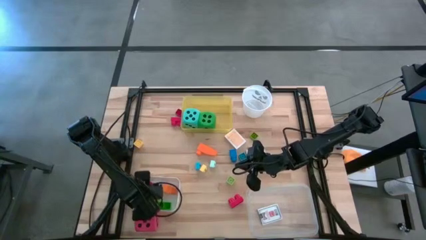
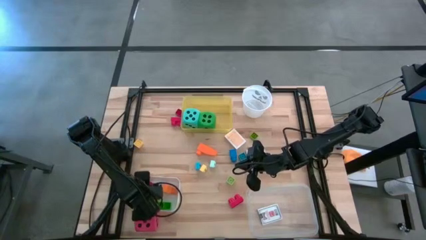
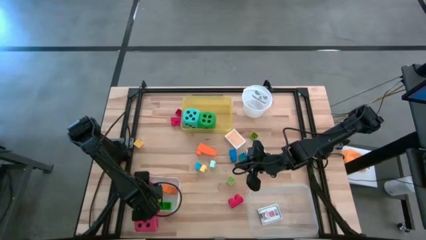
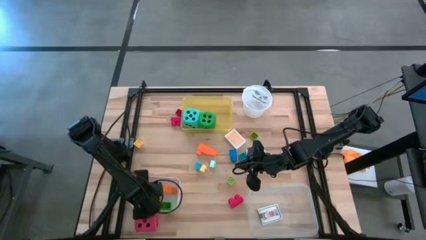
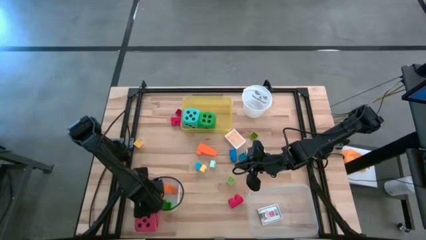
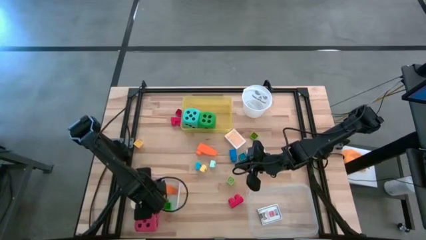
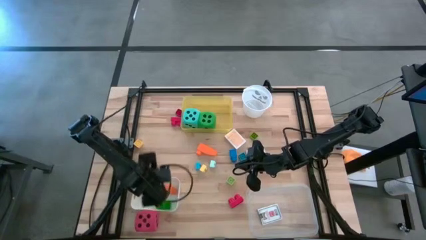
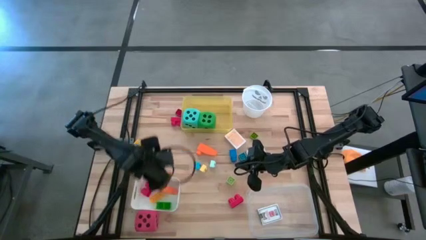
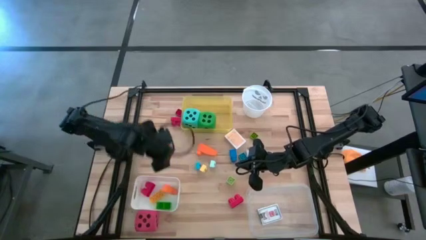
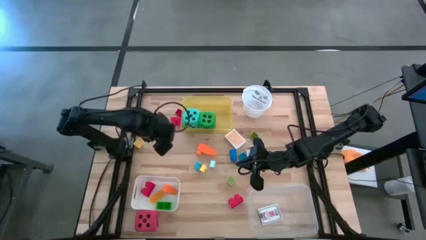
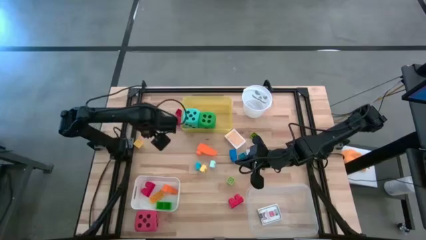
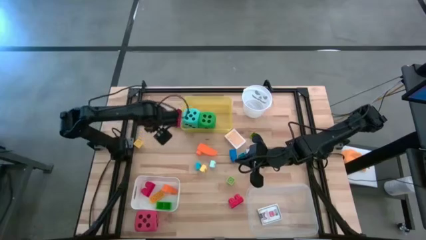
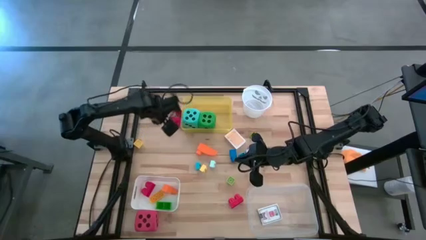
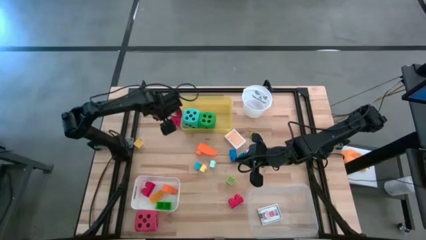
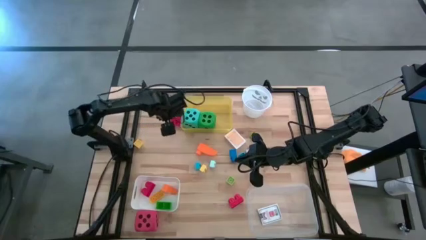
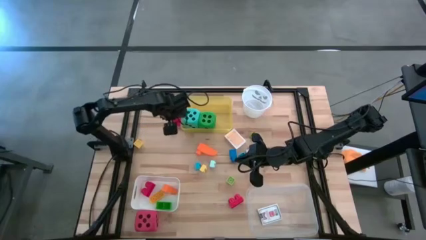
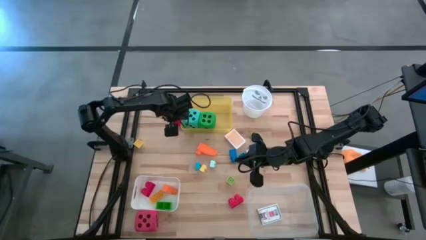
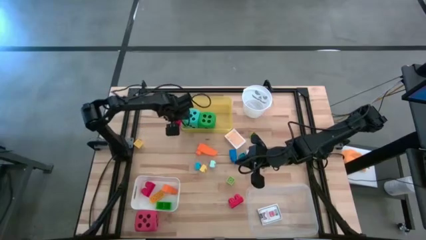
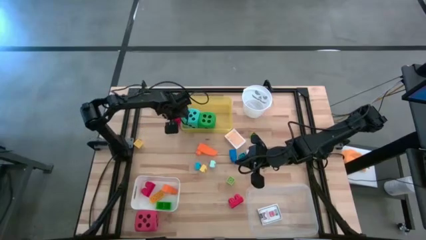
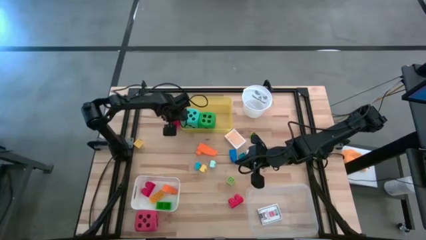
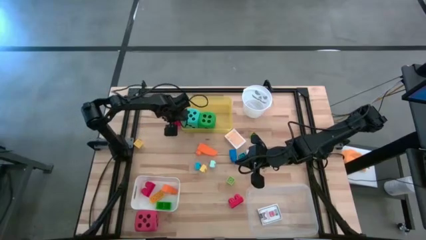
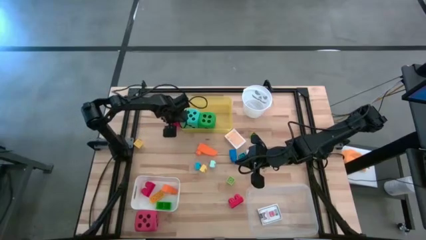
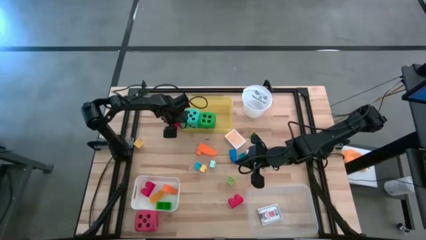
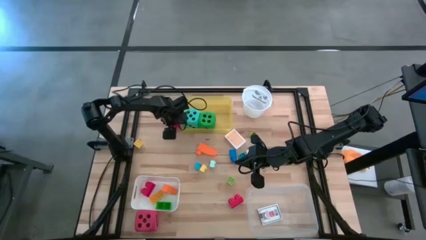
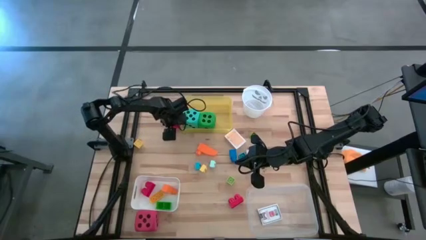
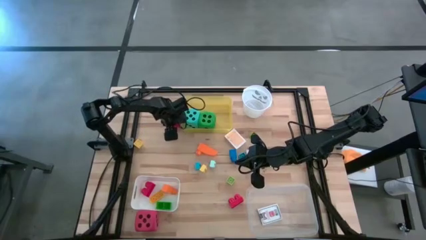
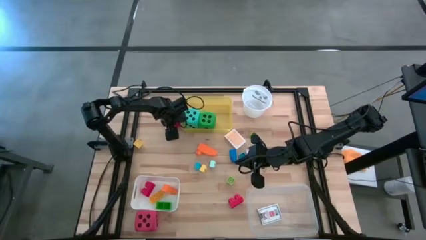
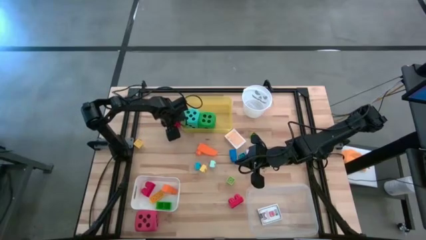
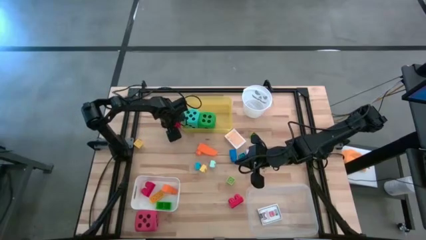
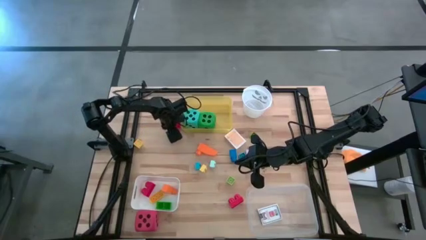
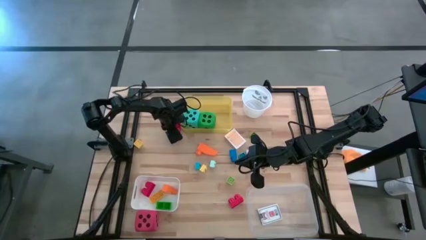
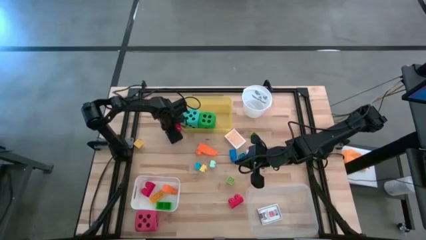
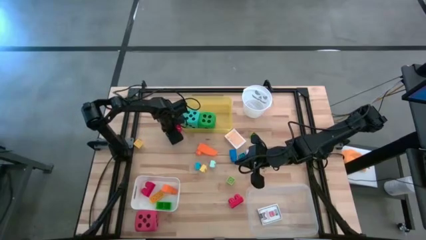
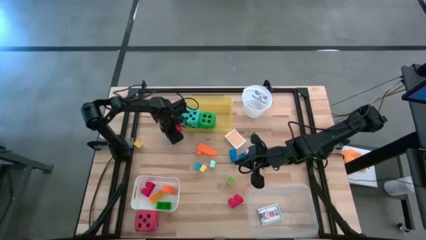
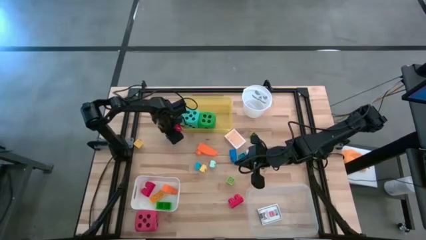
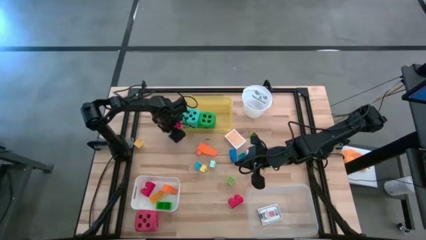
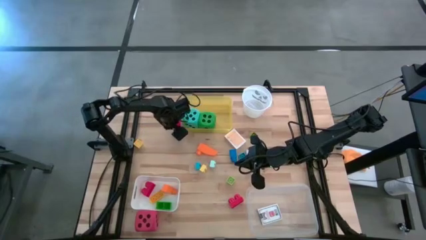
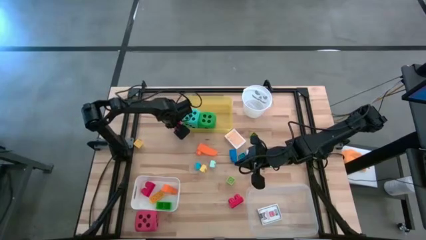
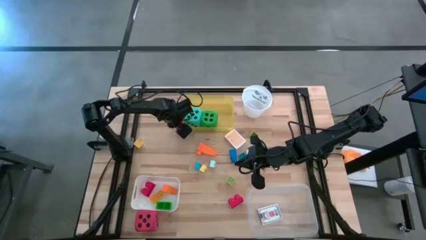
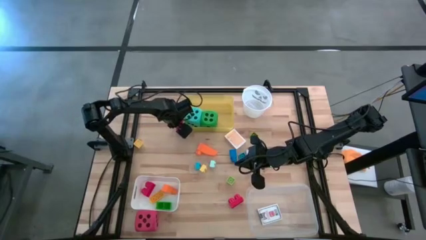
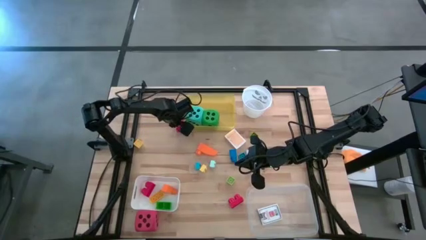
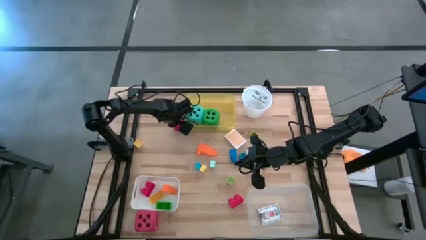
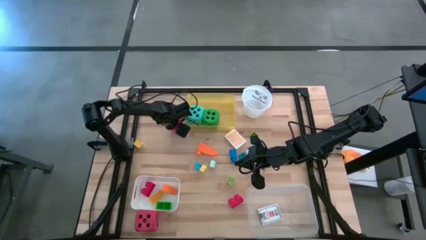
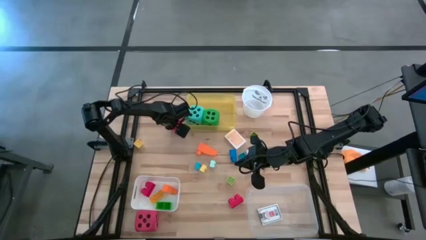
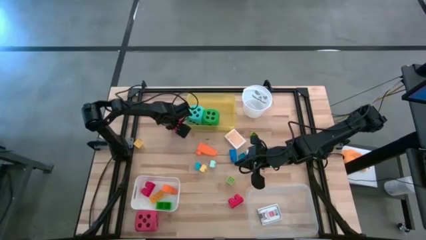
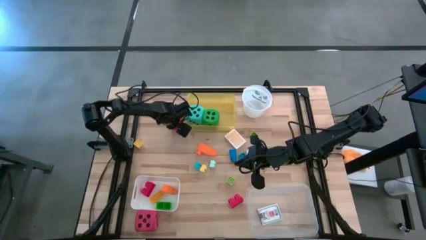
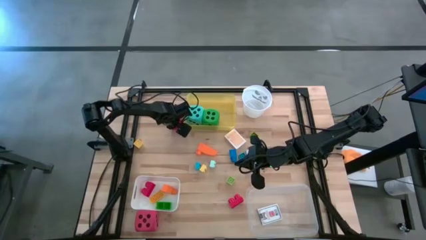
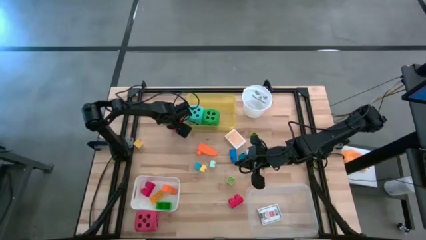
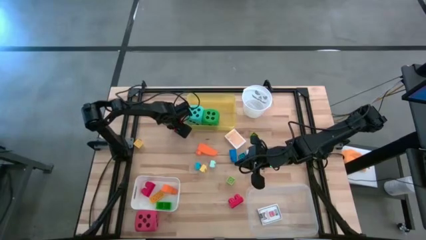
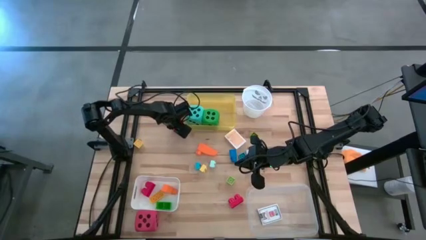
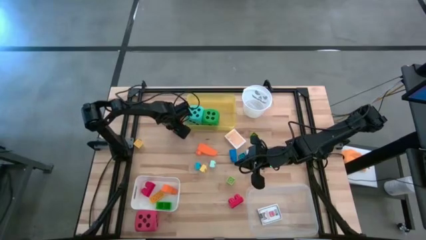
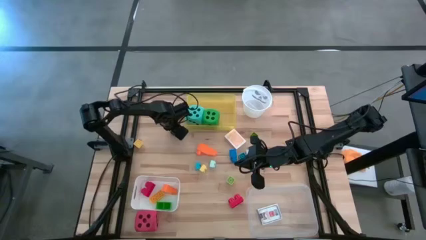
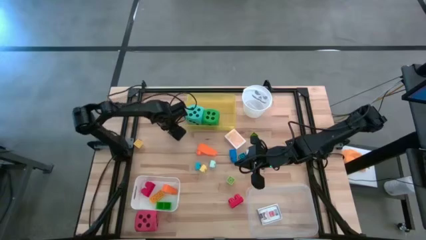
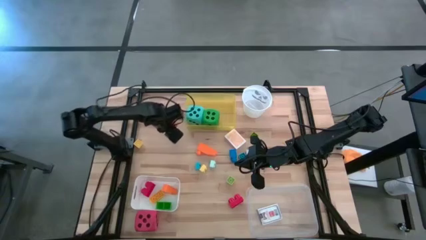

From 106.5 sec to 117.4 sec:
Task: Pick & Place Toys
Put the top red game piece into the white bin

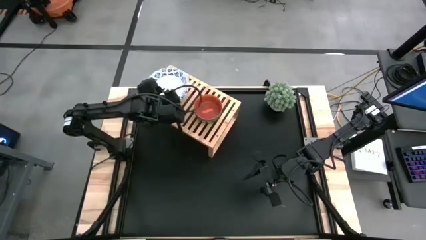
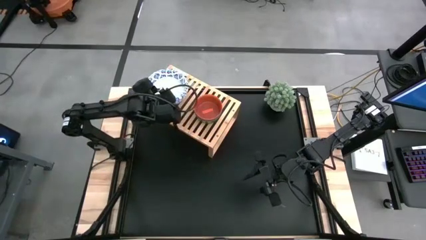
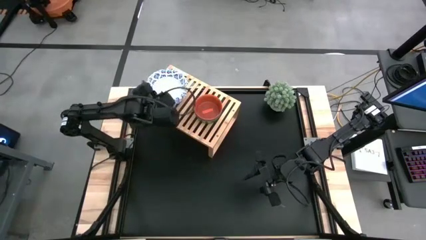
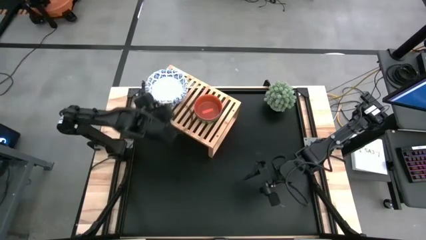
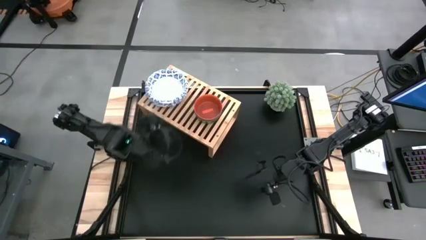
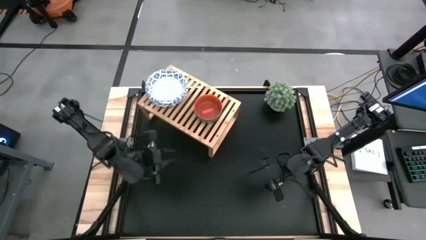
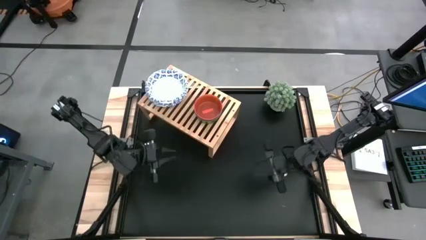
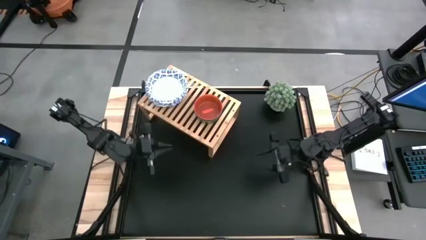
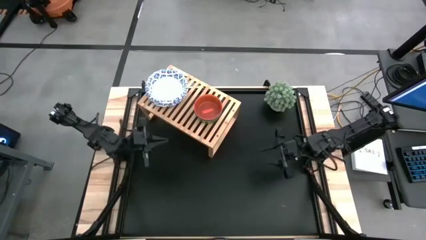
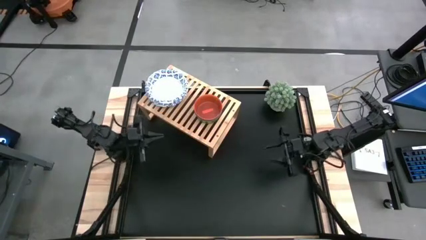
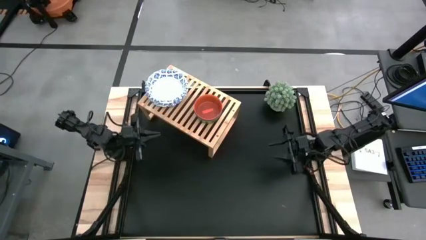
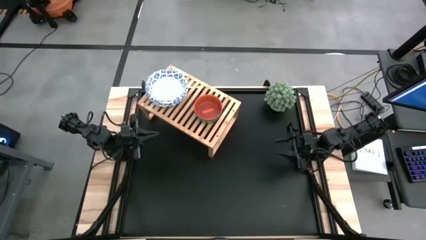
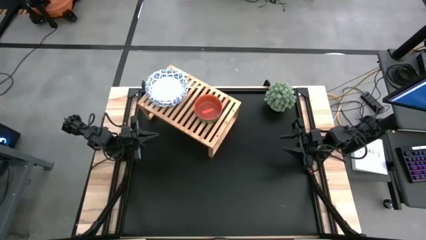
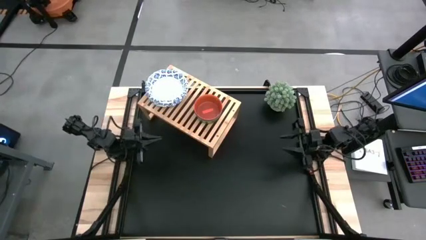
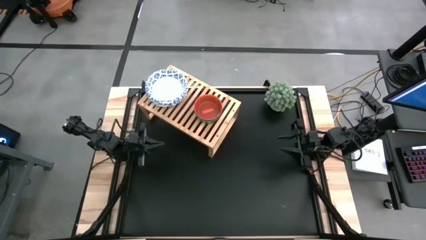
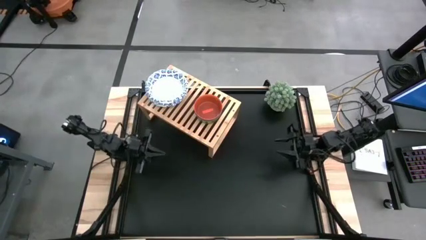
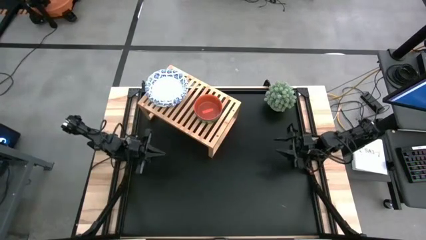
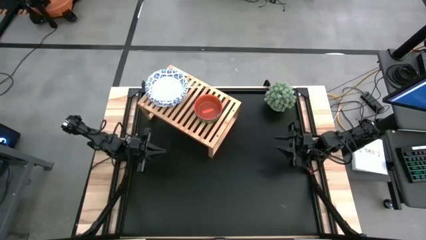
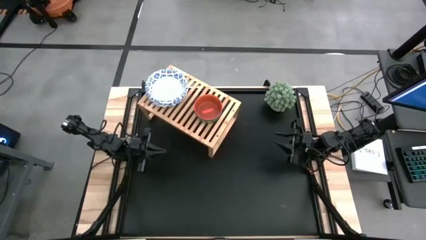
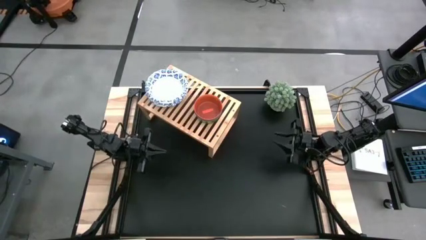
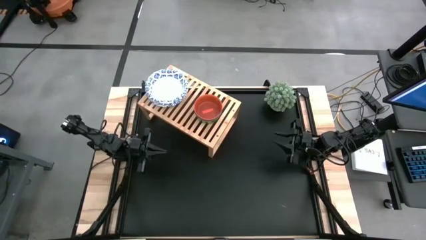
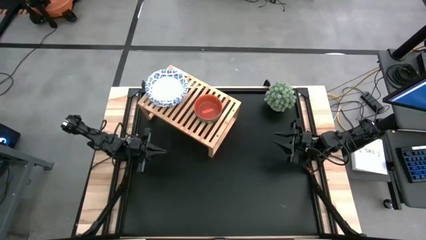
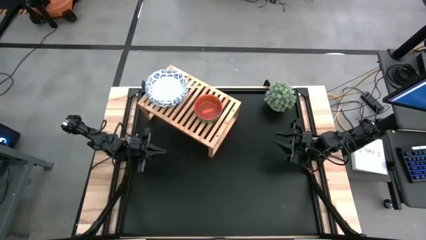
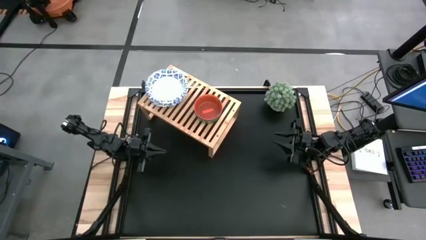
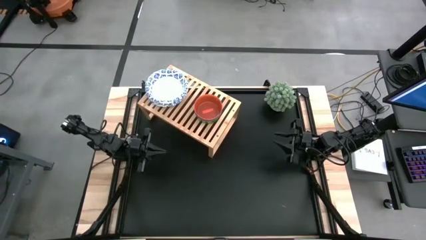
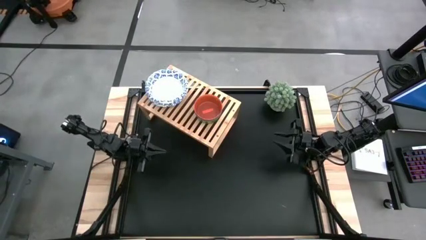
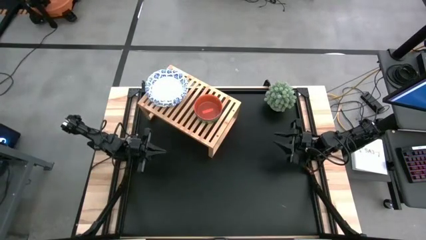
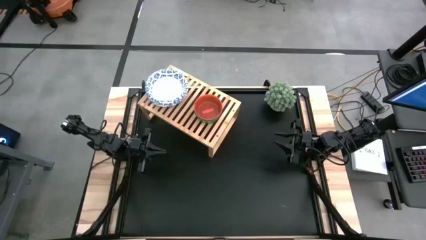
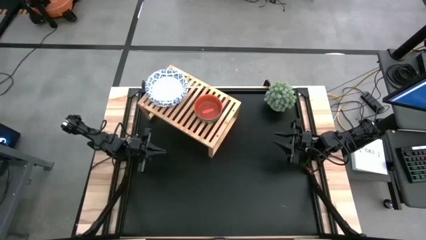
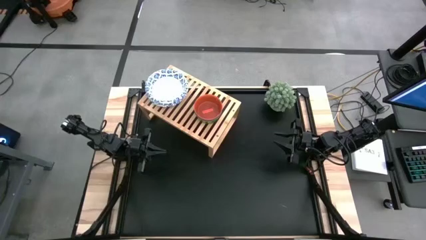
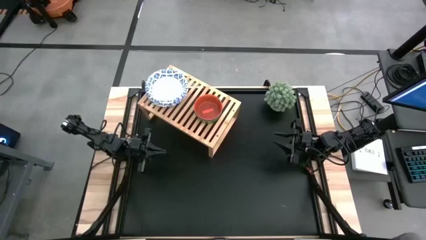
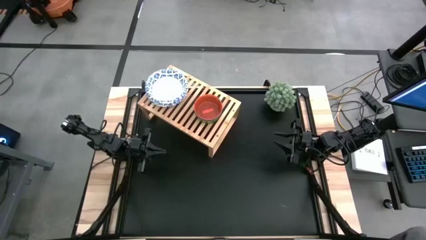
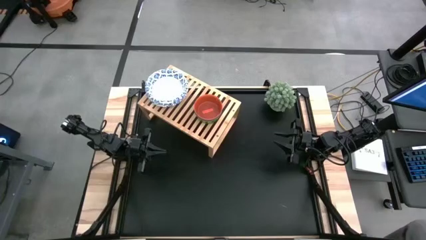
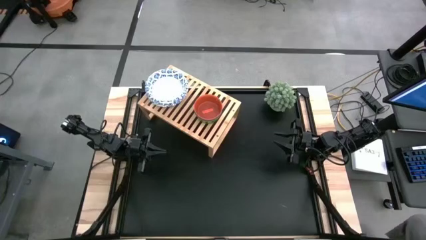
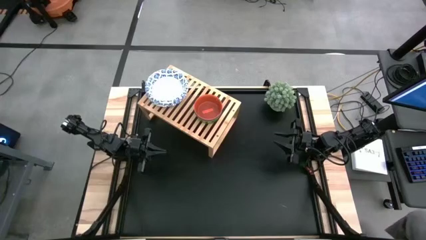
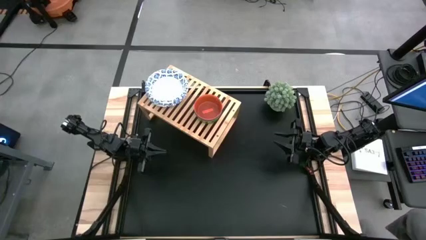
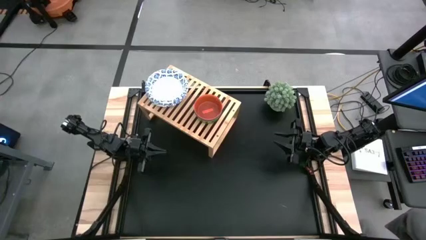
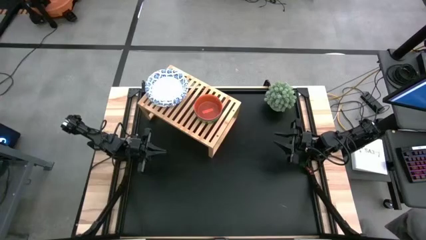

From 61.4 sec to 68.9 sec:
Task: Place and stack bowls onto a shelf
Return to Home Position
